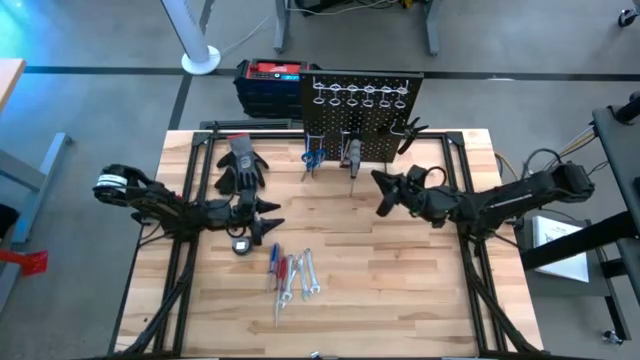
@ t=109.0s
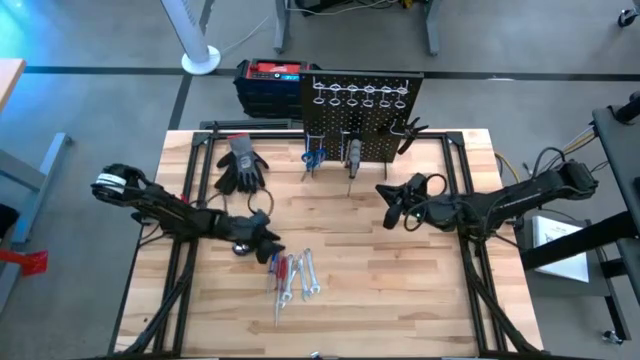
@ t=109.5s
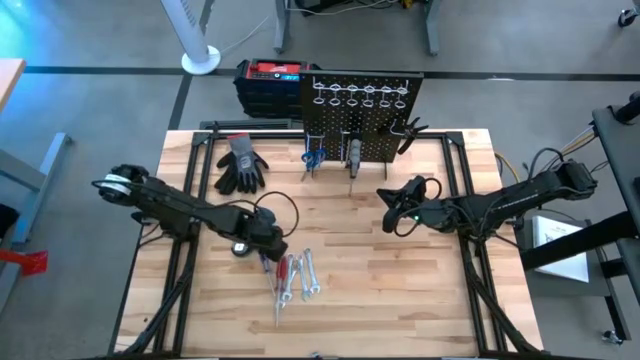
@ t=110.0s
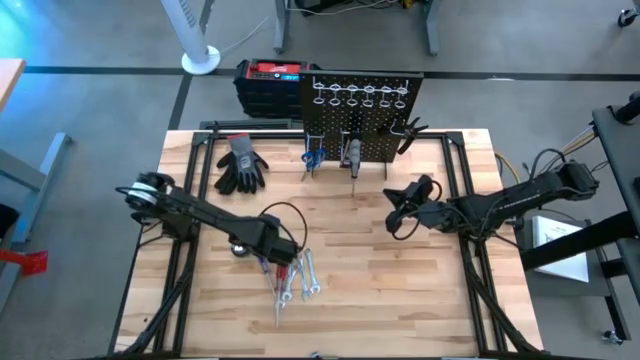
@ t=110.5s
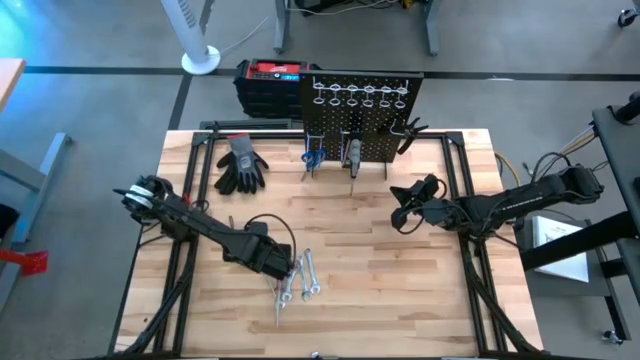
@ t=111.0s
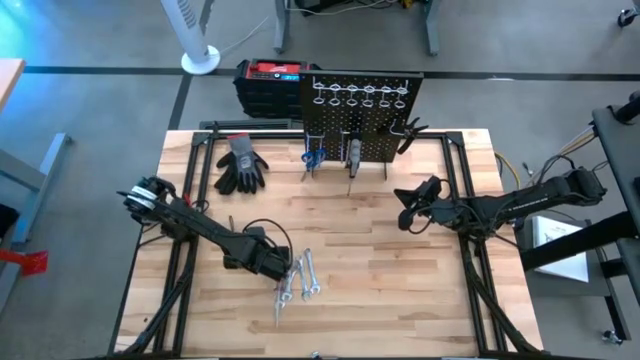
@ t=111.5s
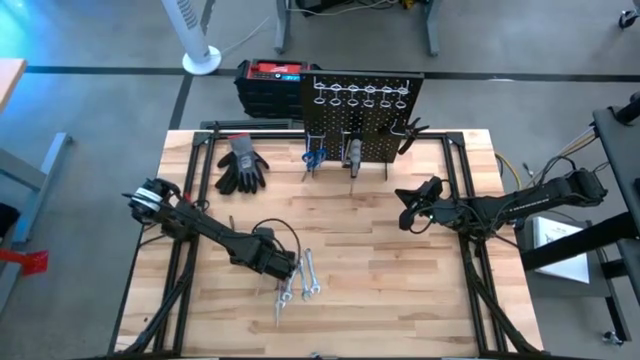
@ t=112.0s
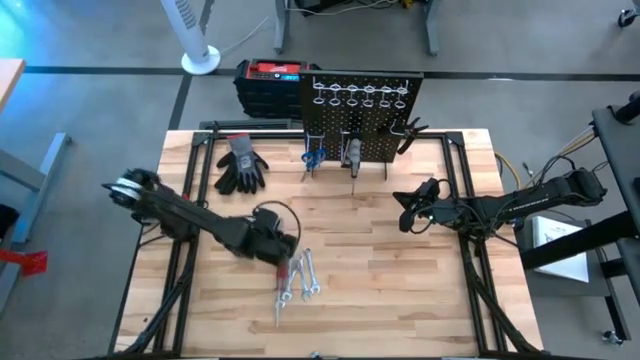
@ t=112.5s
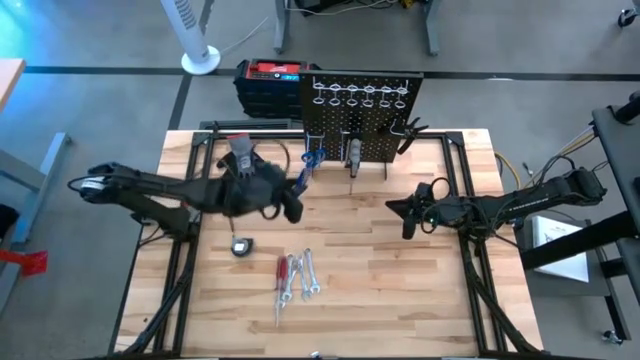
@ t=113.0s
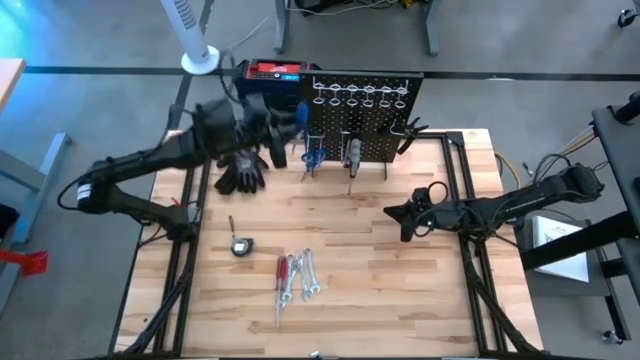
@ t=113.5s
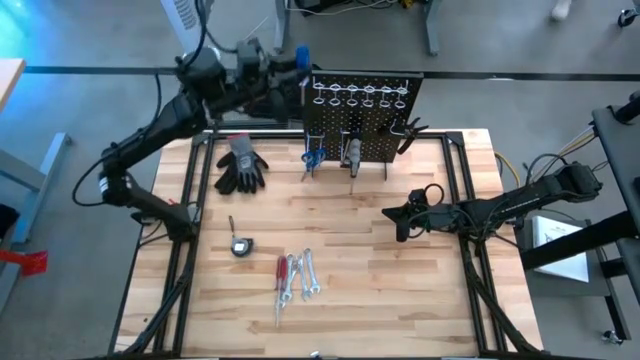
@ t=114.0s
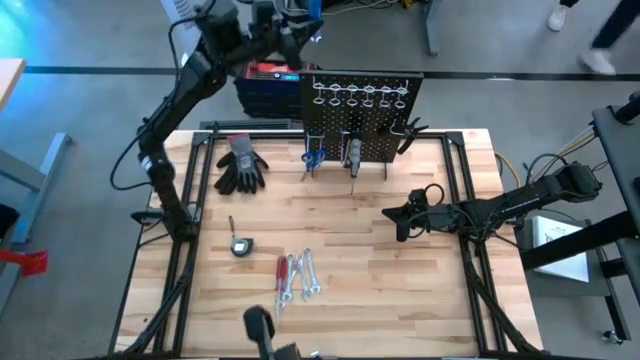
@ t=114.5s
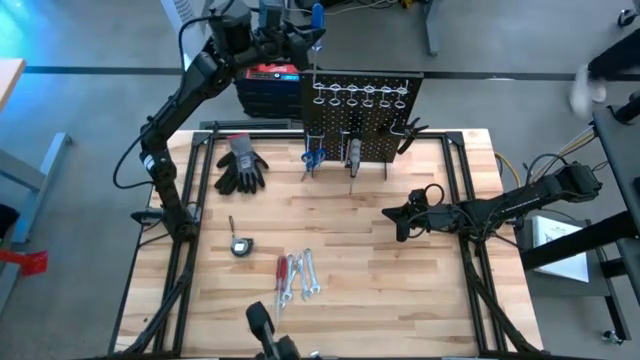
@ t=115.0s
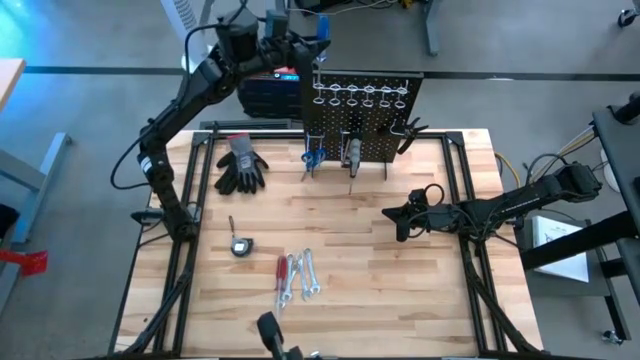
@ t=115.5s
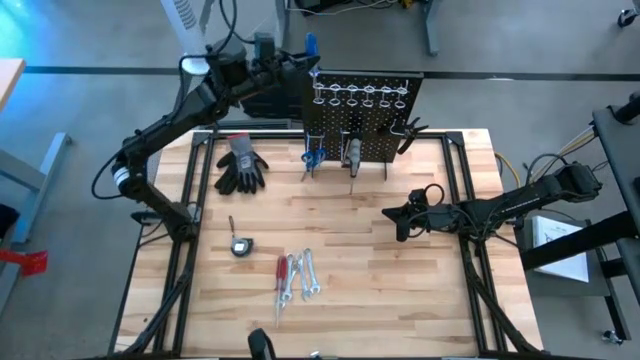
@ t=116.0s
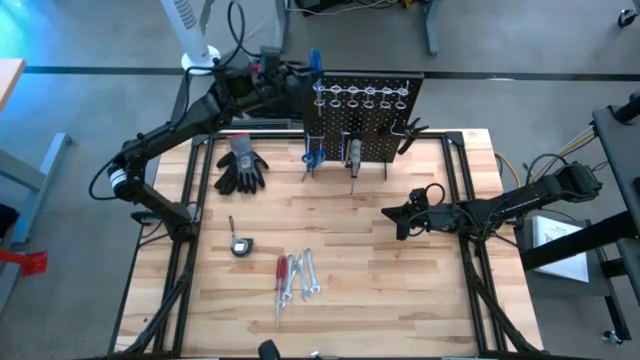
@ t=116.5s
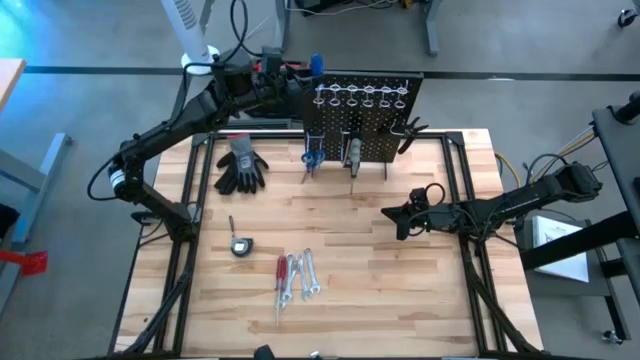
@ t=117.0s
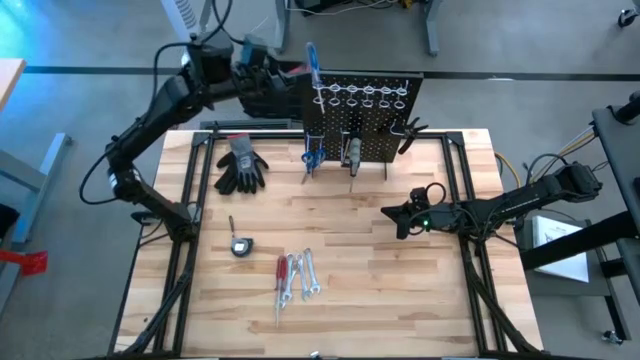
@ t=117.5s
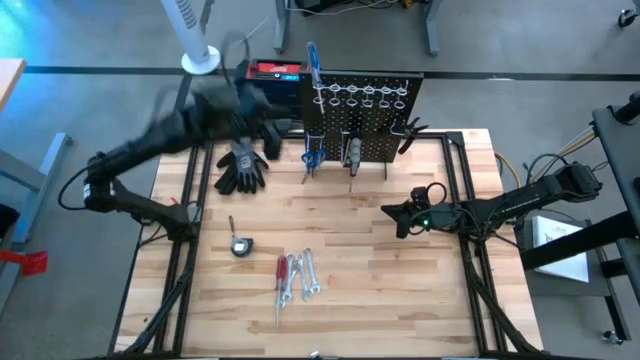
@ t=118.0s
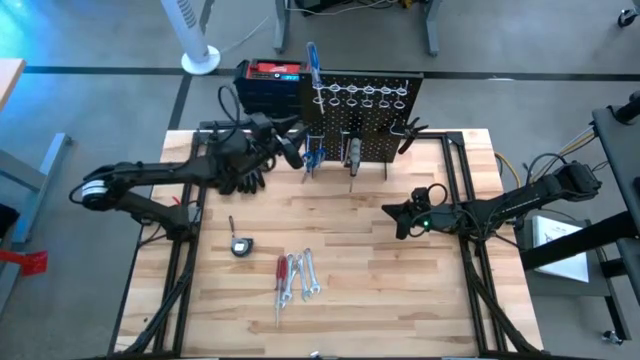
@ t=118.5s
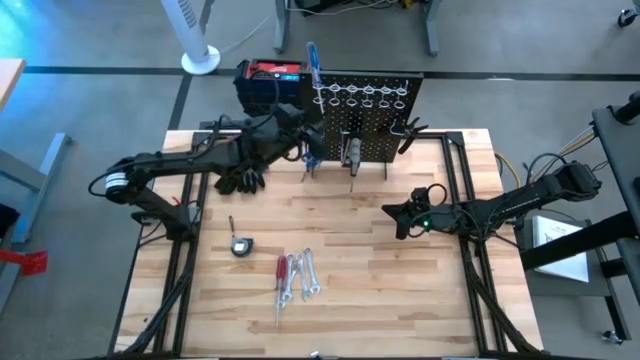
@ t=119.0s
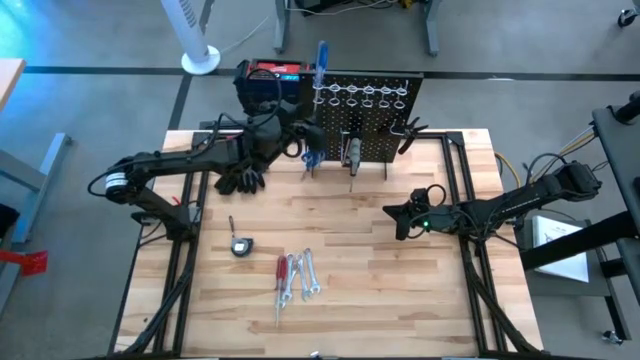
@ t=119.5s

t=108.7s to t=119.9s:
Task: Hang tools onto peg board
Hang the blue screwdriver on the pegboard

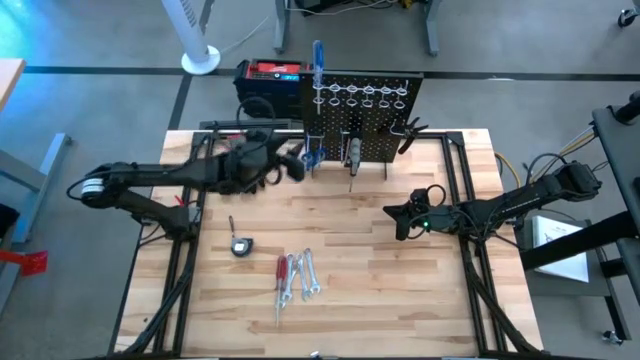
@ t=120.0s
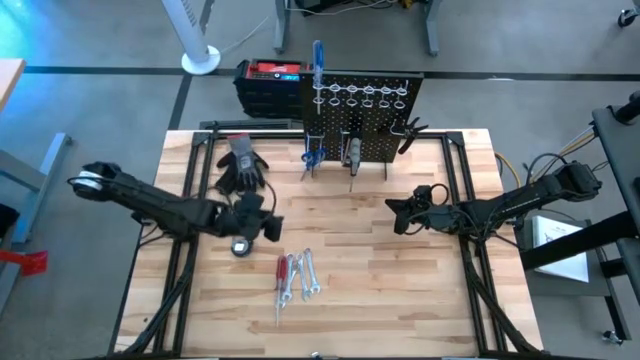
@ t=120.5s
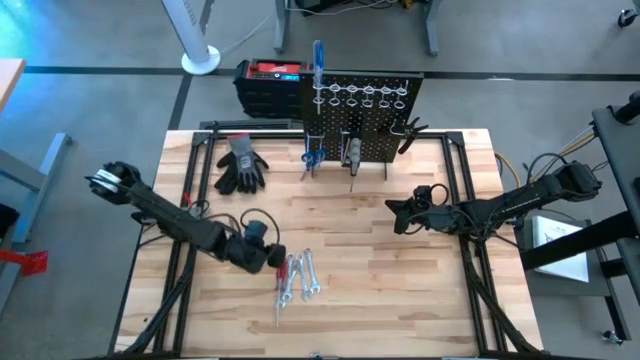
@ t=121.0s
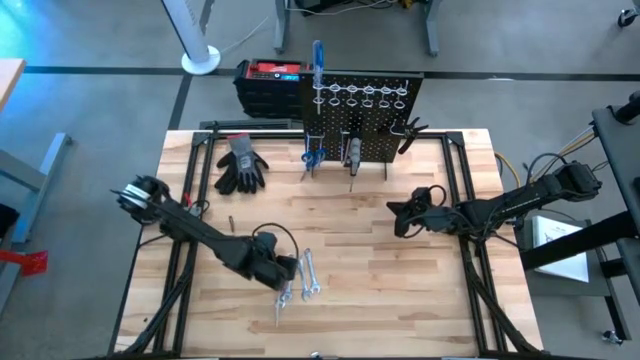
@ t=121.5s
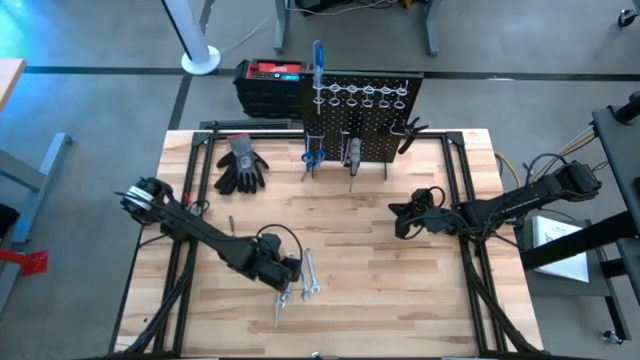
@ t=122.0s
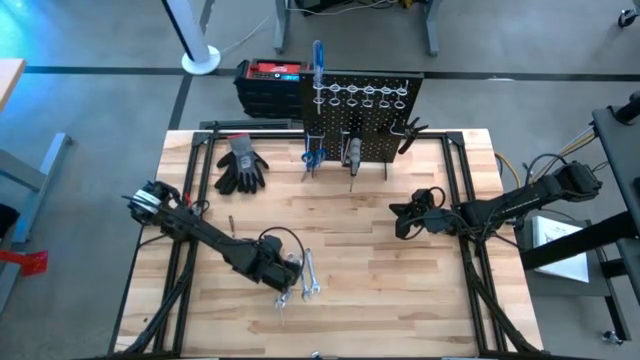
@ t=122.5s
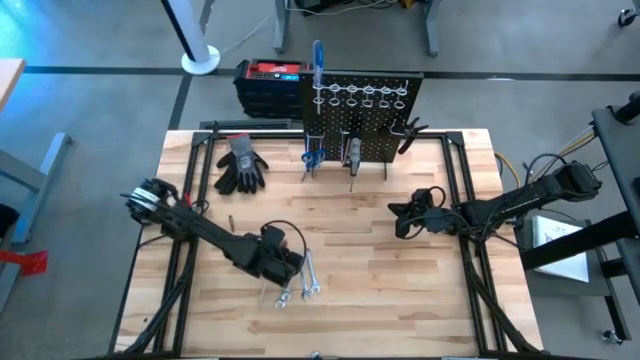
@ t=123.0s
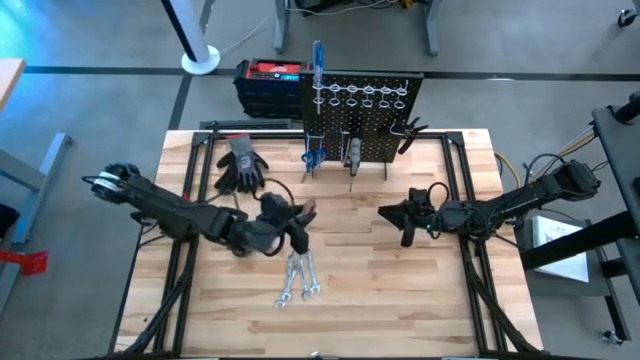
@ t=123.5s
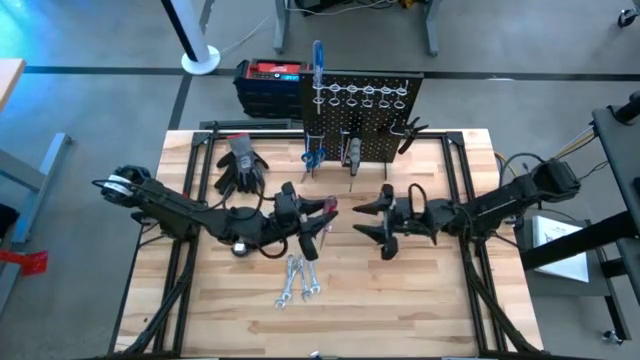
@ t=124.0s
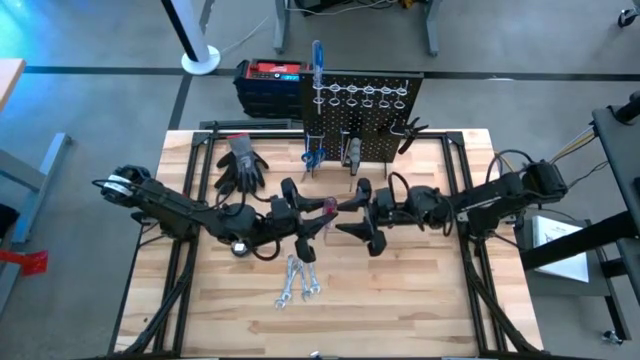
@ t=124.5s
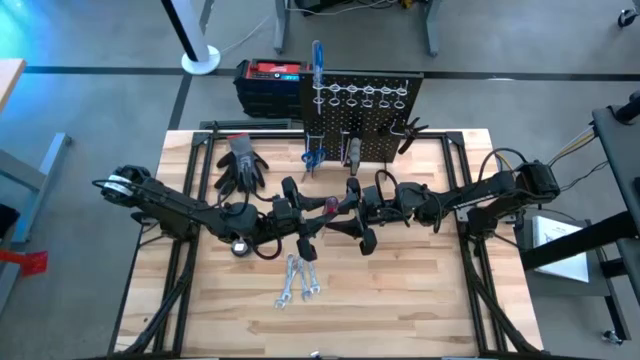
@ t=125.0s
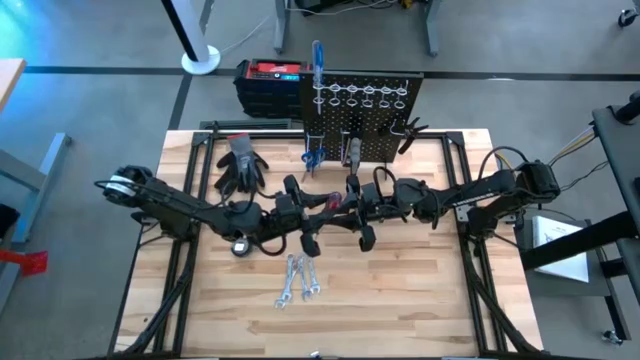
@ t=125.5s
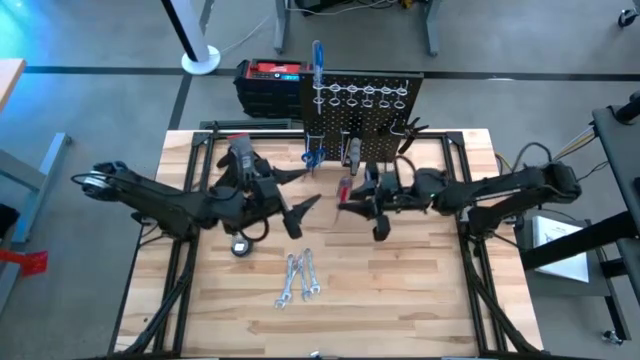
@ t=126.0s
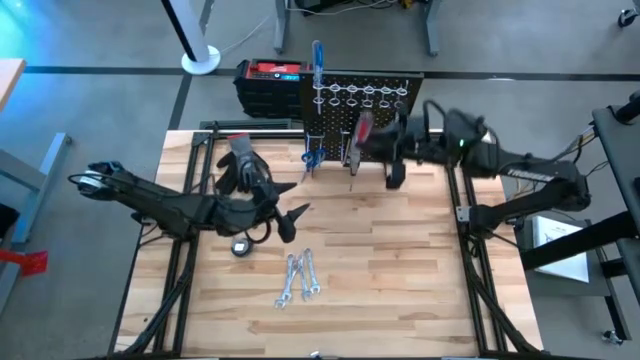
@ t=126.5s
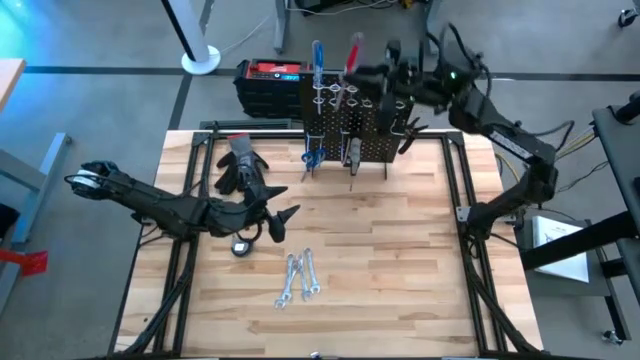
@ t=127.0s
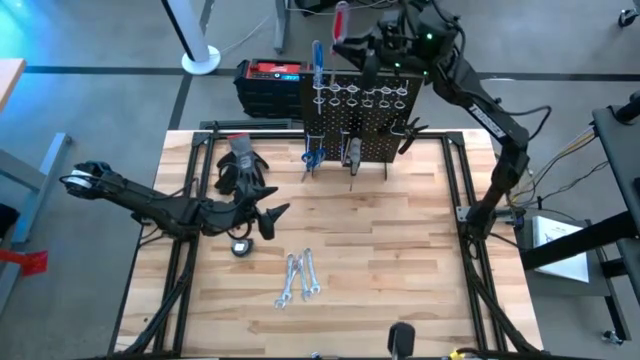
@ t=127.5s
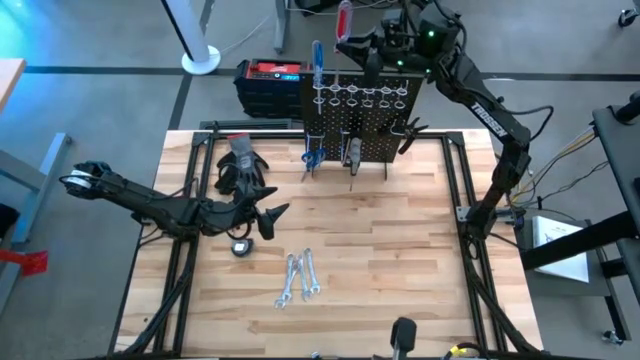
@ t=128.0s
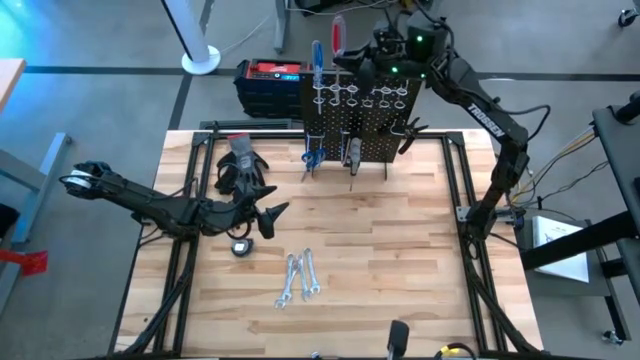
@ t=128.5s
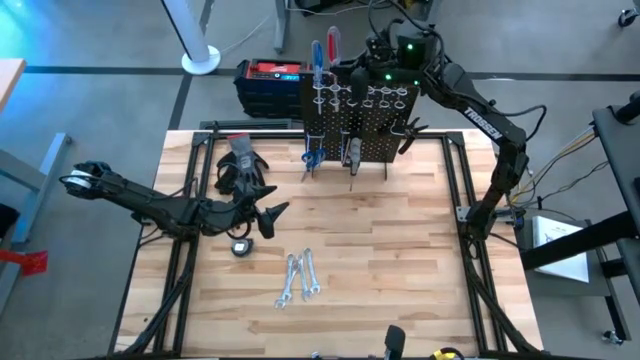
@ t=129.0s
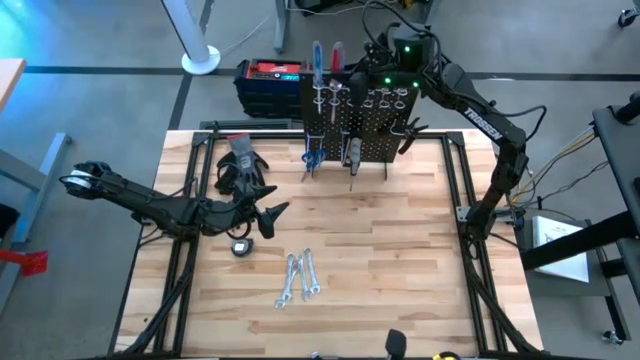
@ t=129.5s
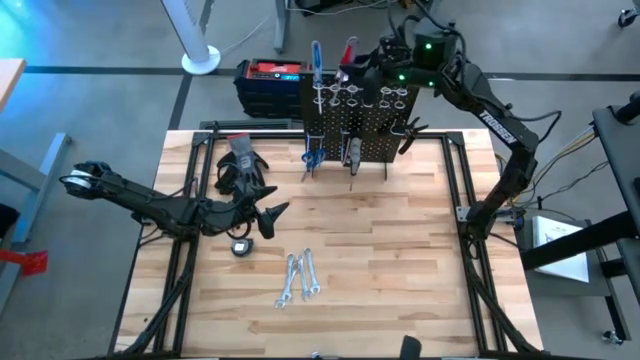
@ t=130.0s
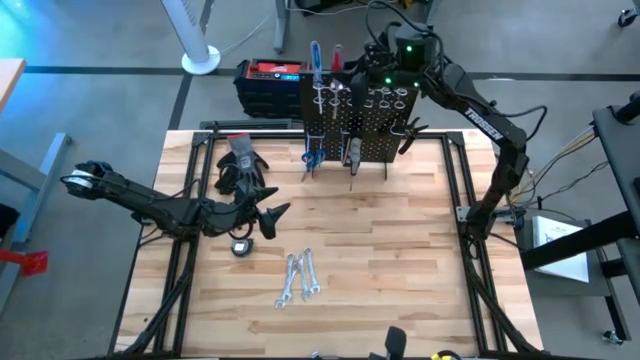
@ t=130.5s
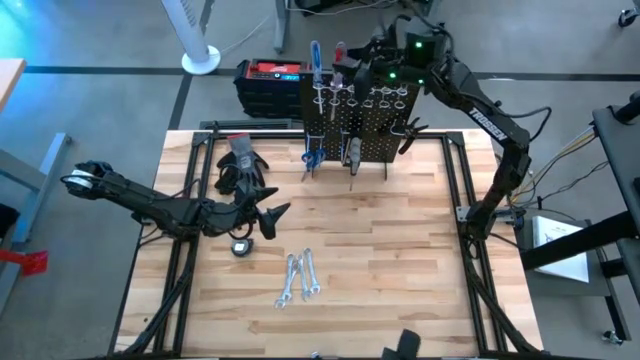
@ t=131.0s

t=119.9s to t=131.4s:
Hang the red screwdriver on the peg board
